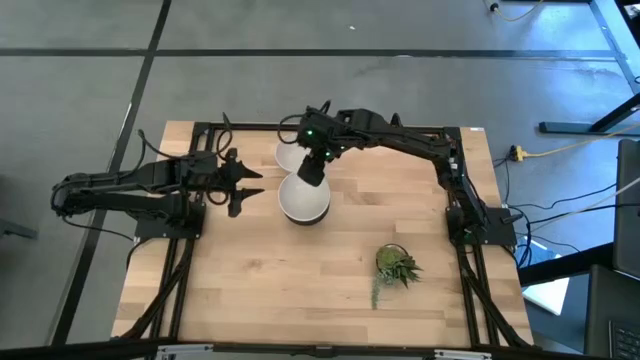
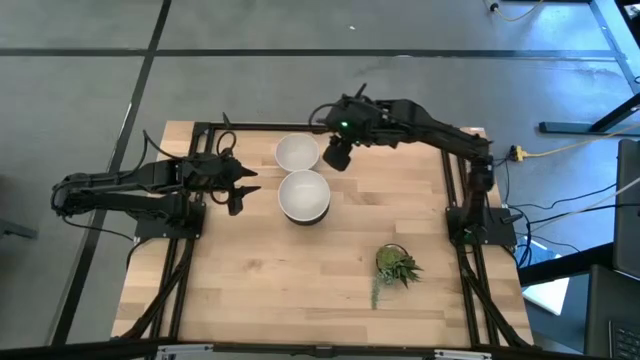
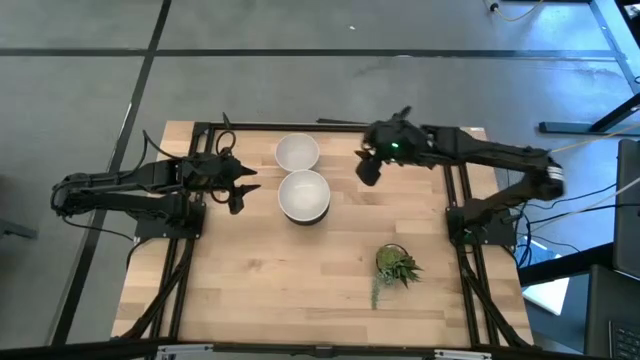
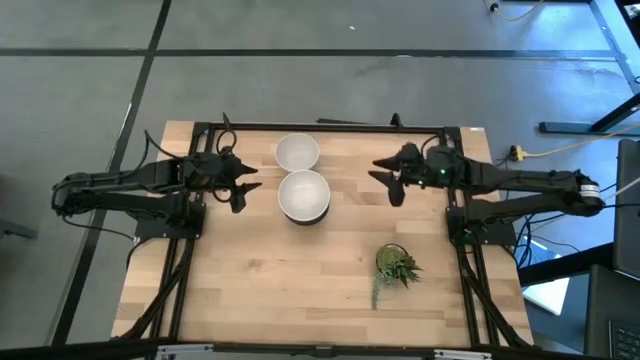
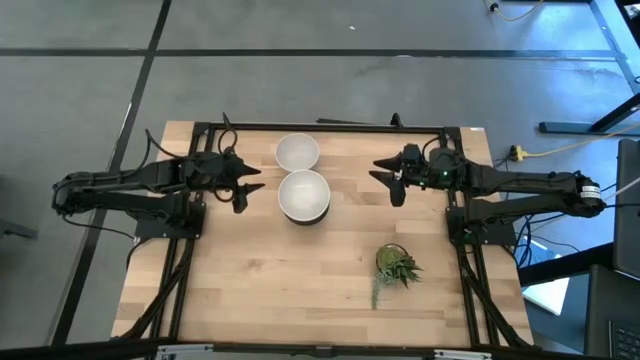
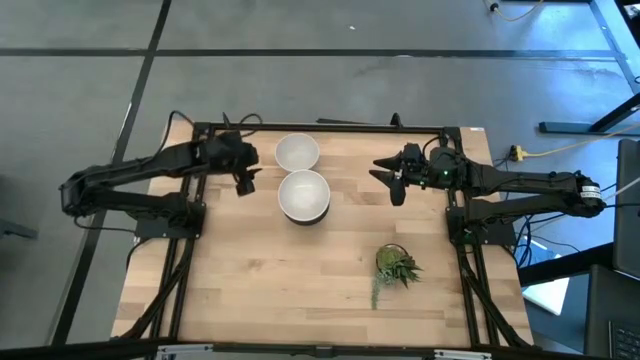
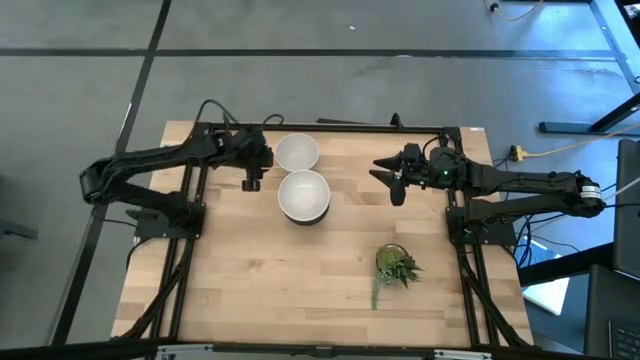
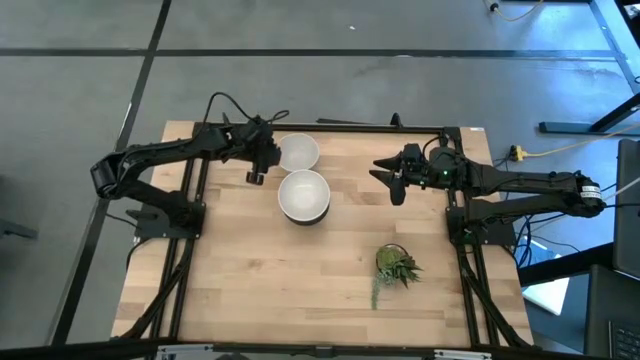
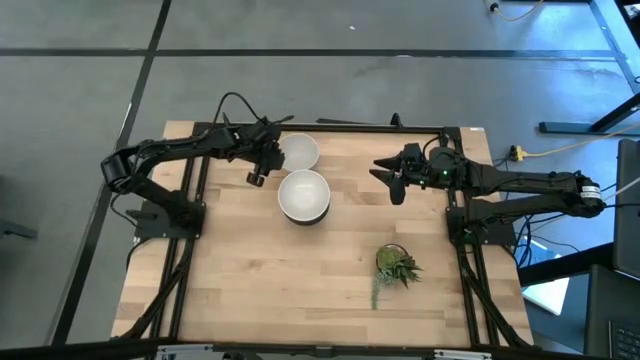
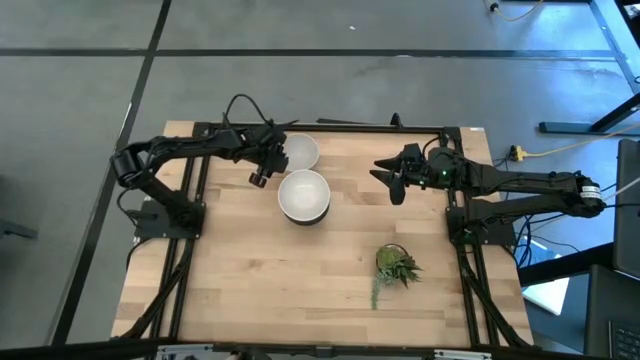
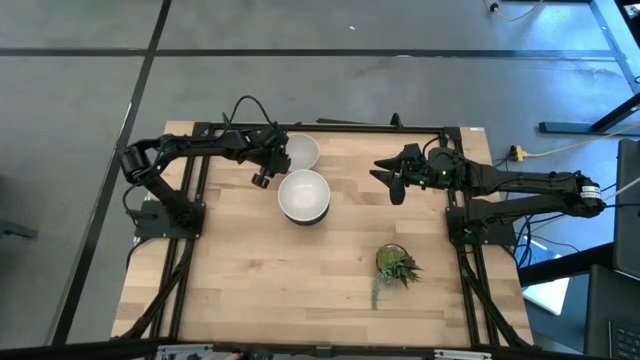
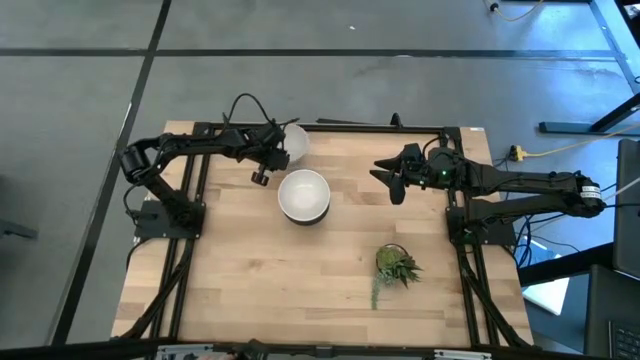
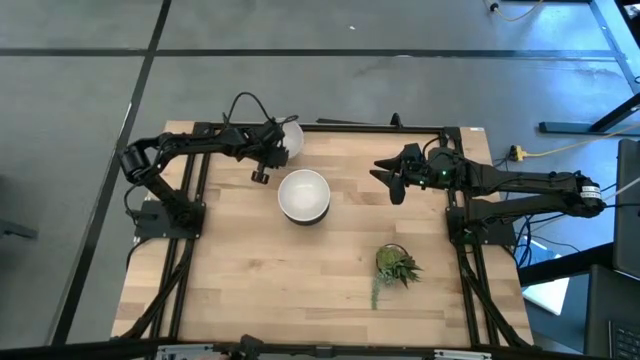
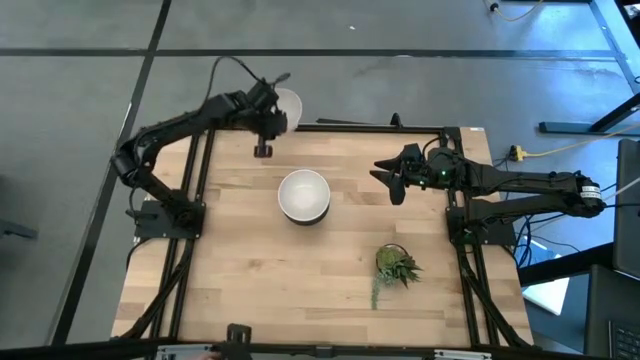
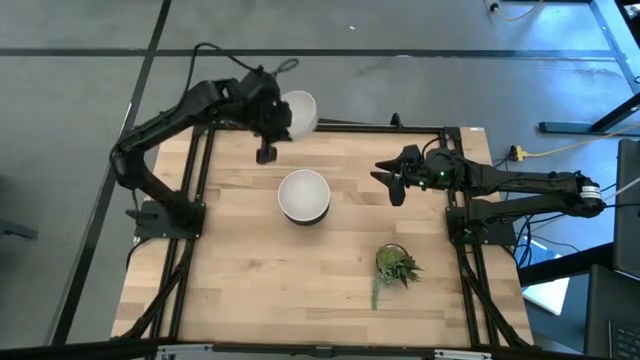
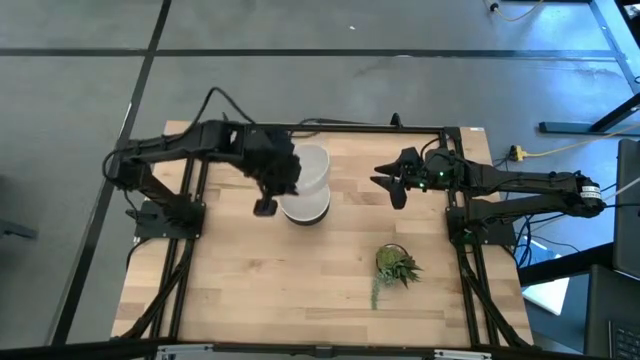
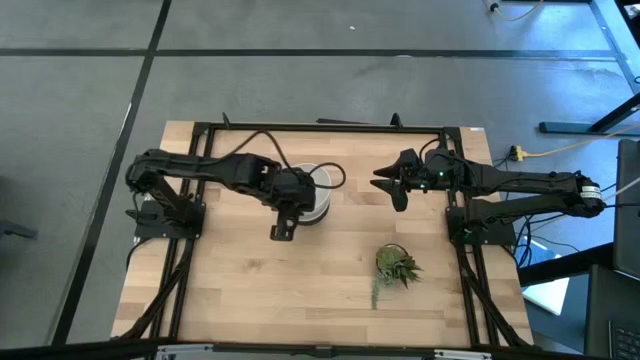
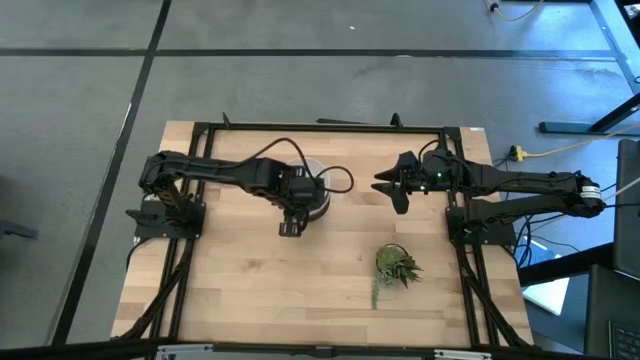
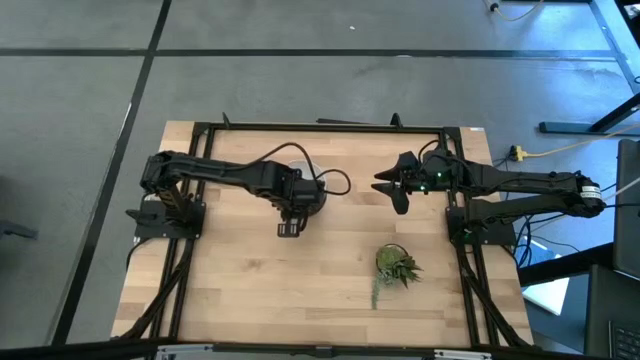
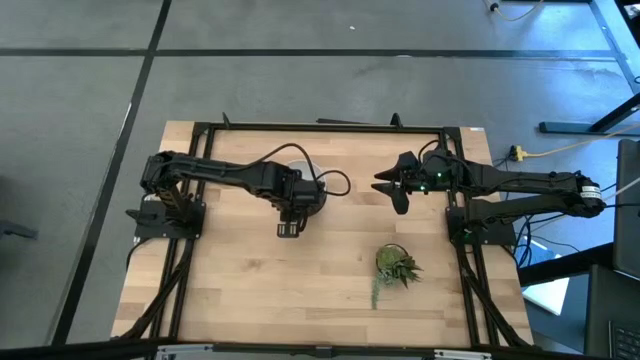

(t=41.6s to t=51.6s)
Task: Nest bowls inside each other
Stack the top white bowl on top of the other bottom white bowl

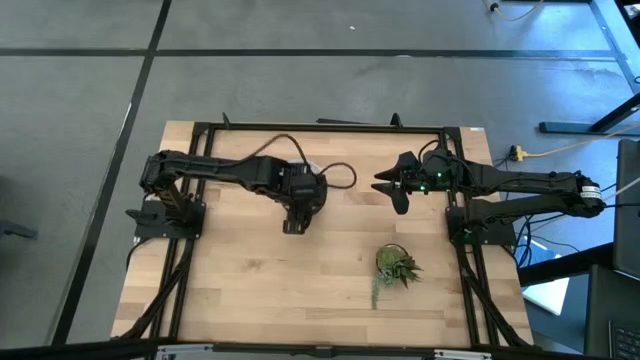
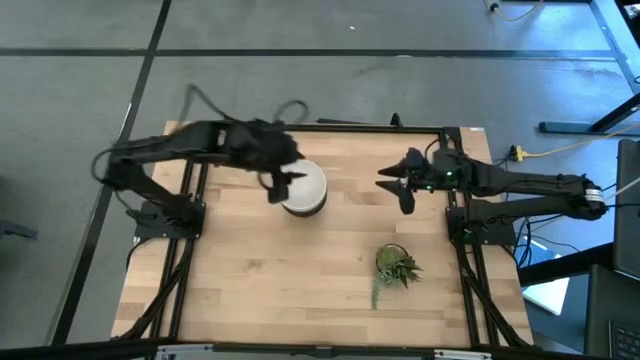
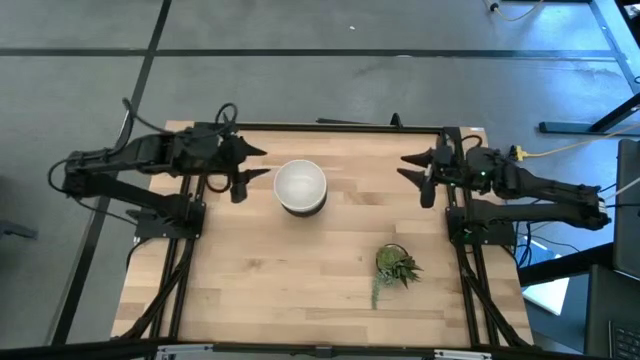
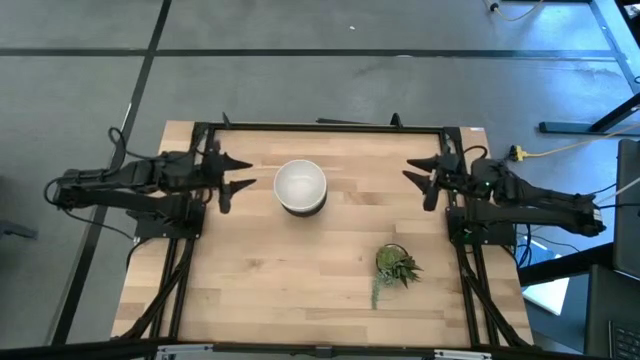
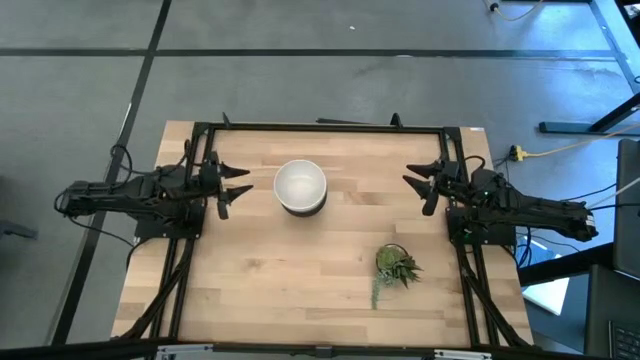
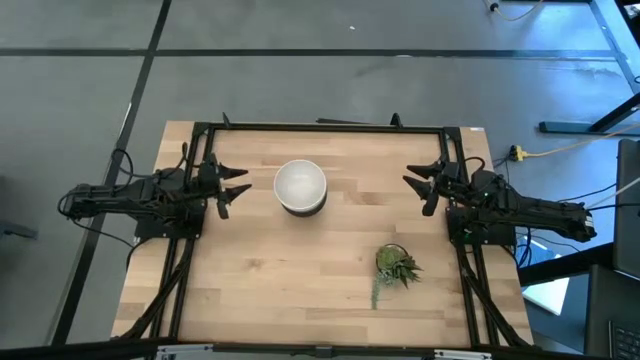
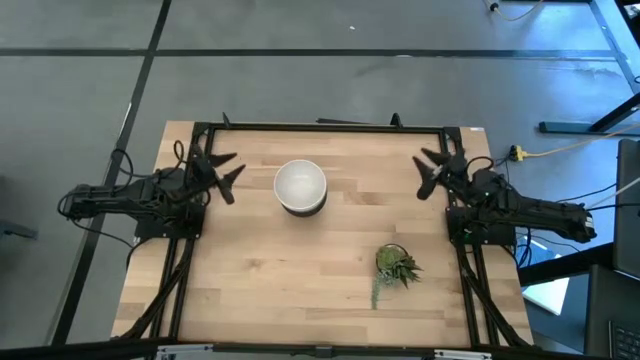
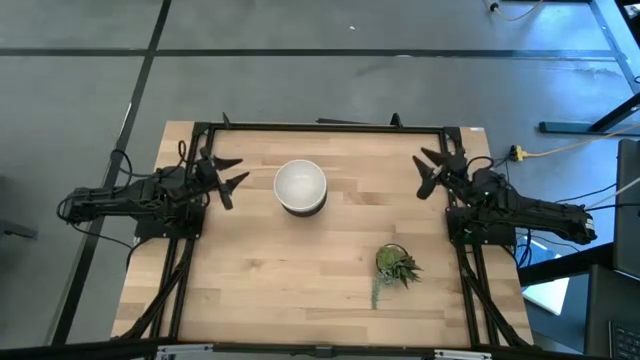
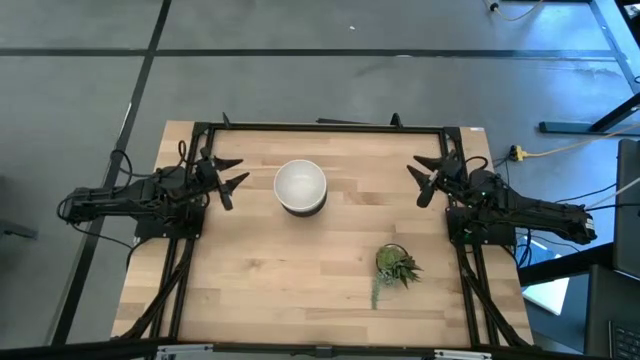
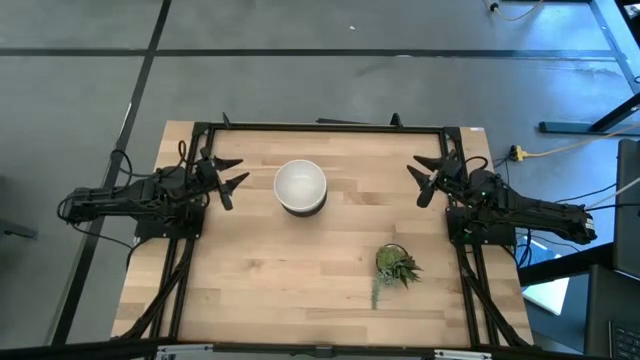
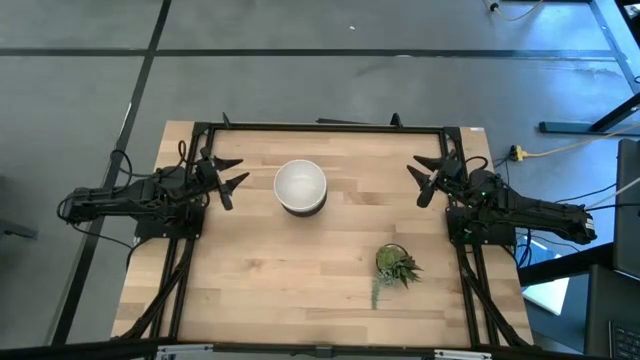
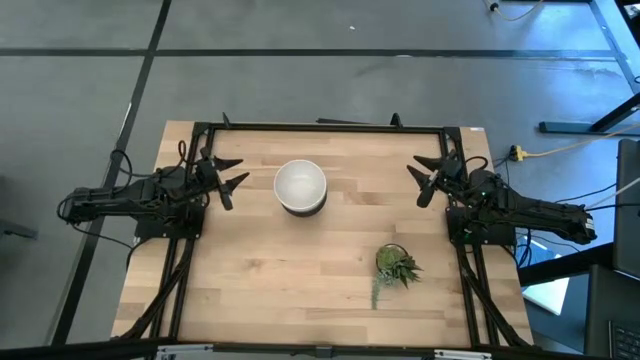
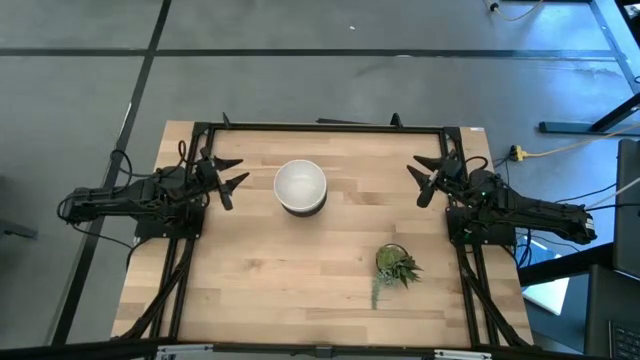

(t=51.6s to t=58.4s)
Return to Home Position

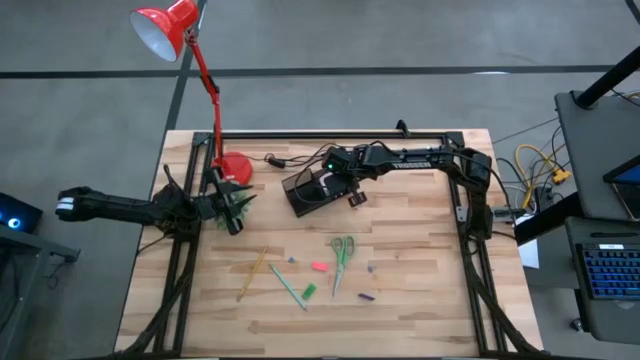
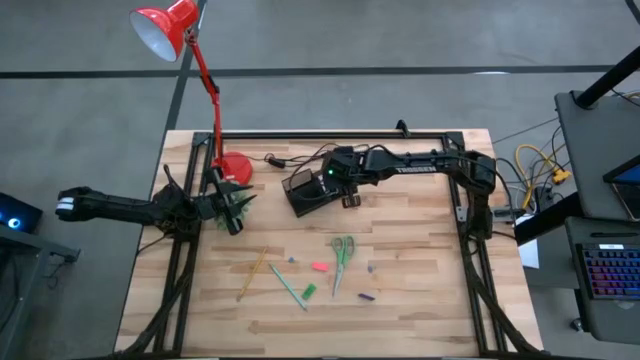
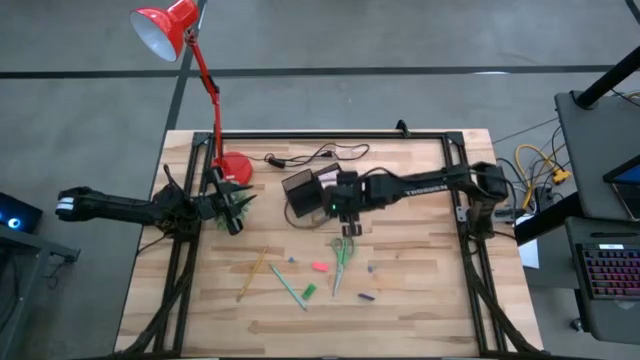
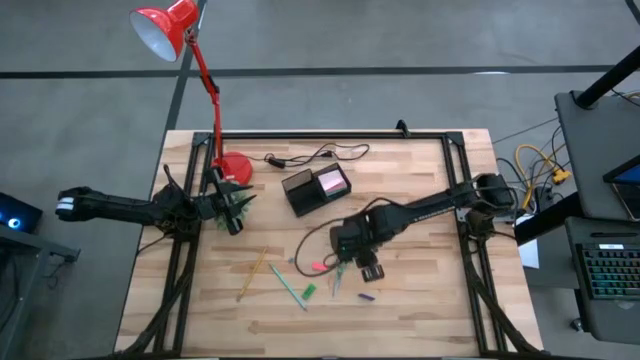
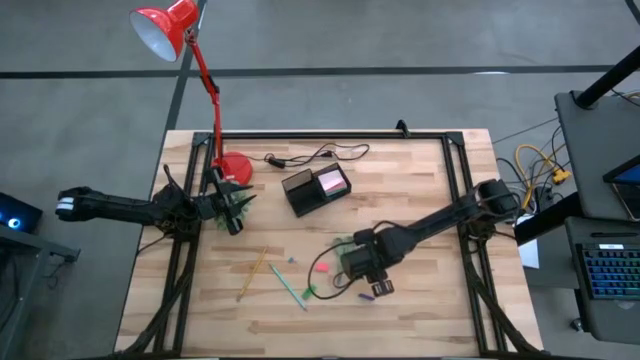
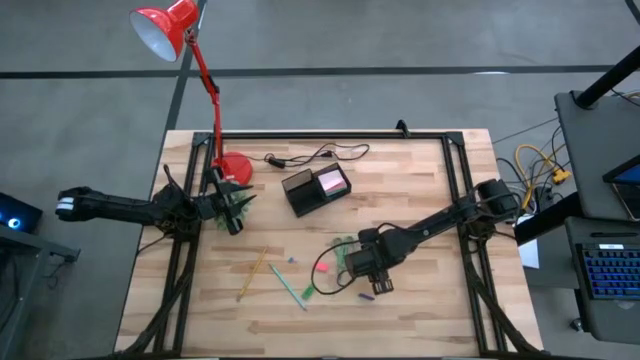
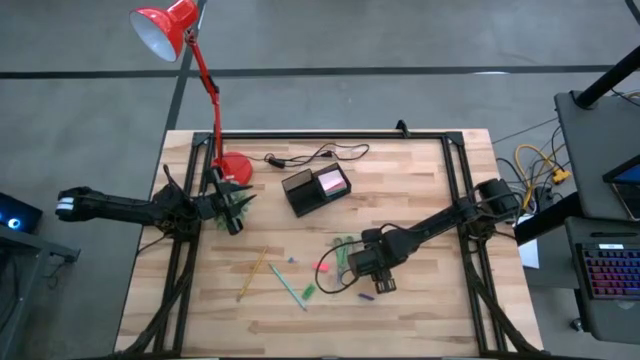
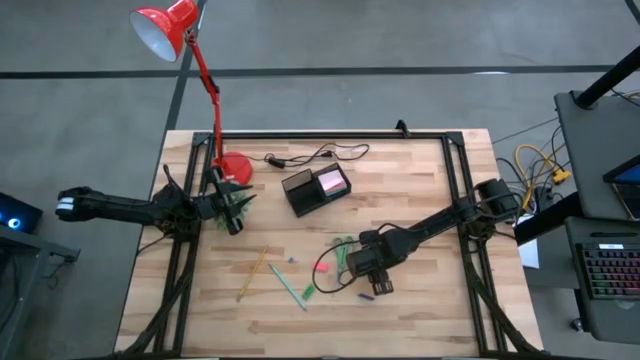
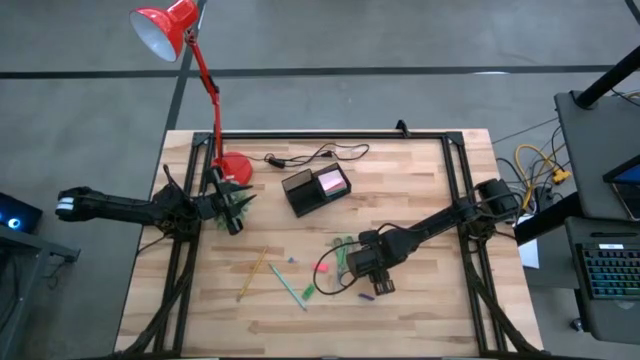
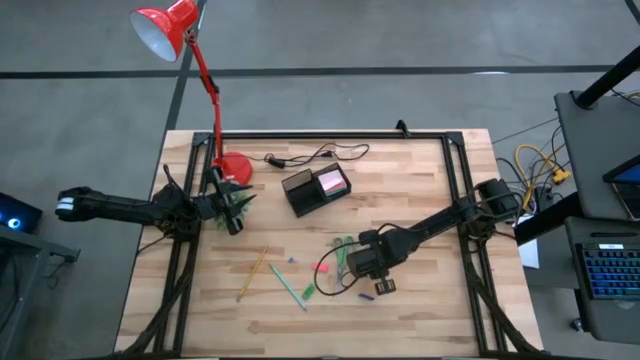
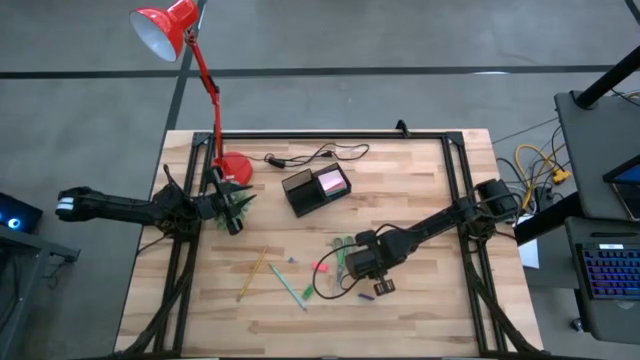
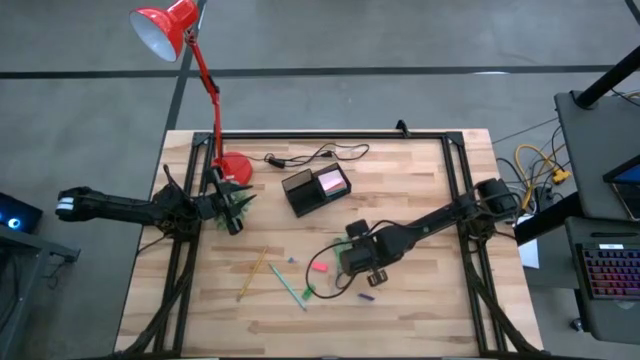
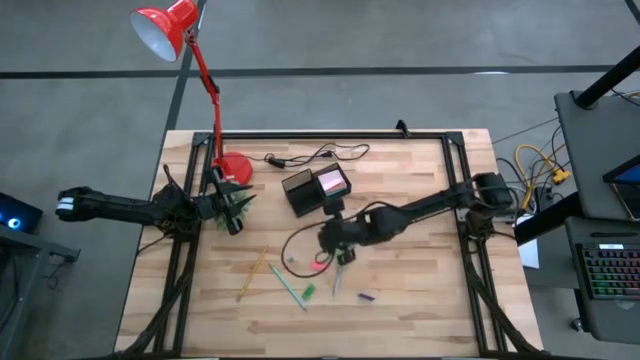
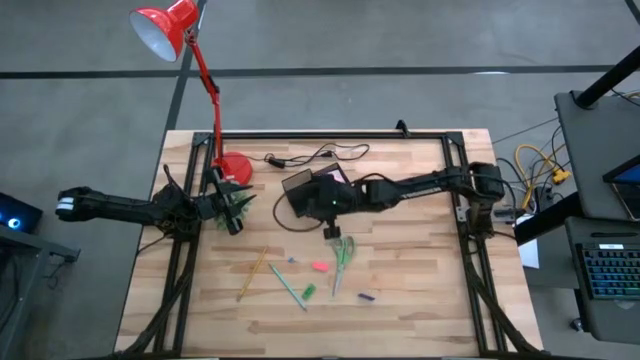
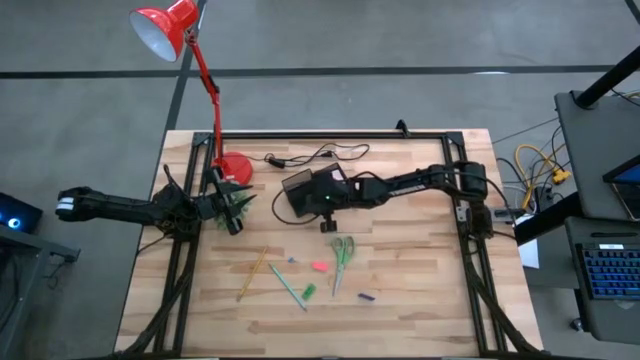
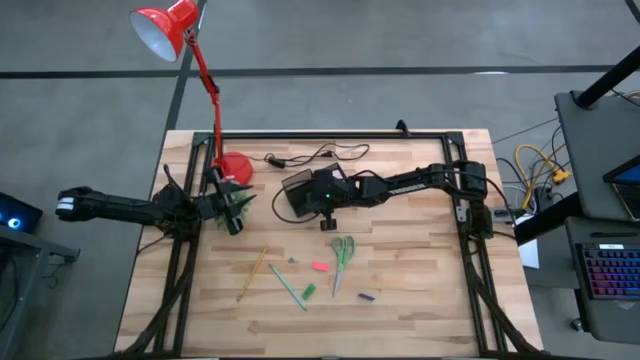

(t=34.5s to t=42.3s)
Task: Pick and place office supplies into organizer
Put the right blue binder clip into the black desk organizer
